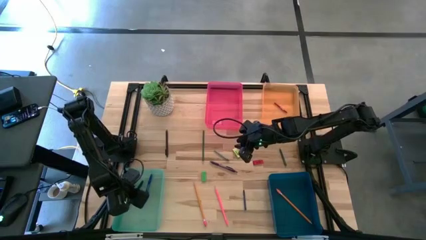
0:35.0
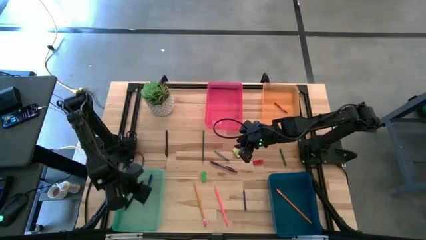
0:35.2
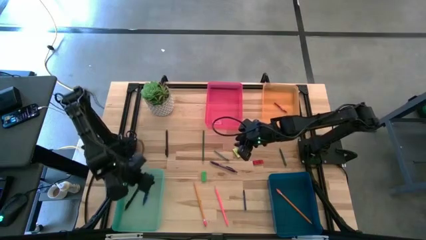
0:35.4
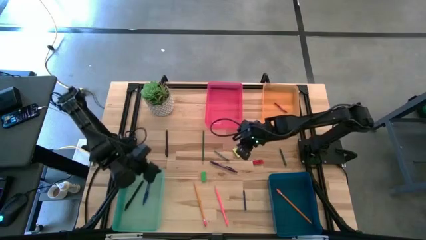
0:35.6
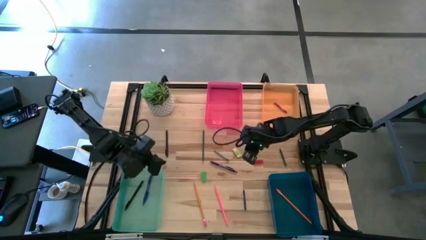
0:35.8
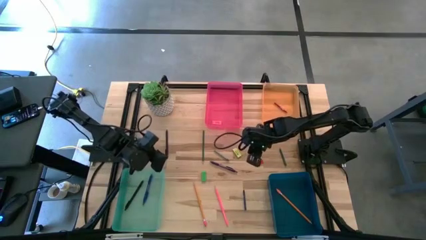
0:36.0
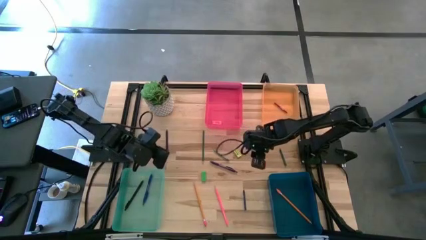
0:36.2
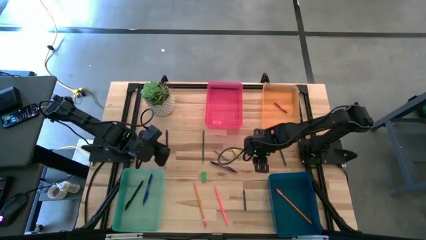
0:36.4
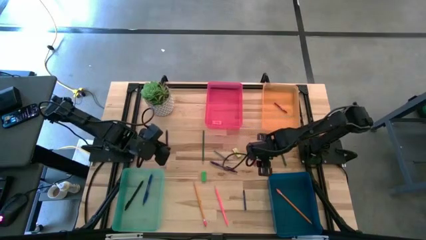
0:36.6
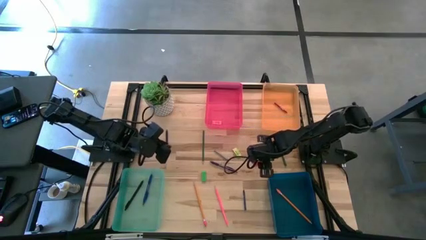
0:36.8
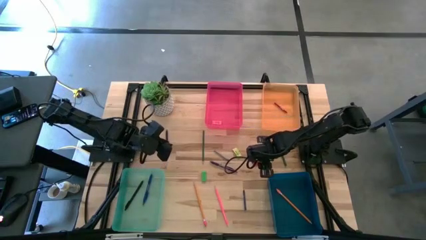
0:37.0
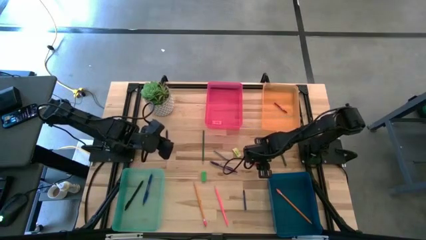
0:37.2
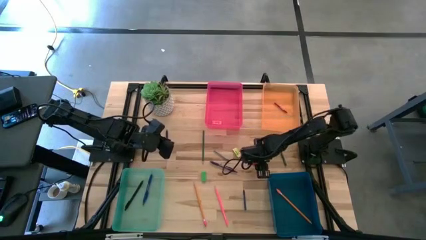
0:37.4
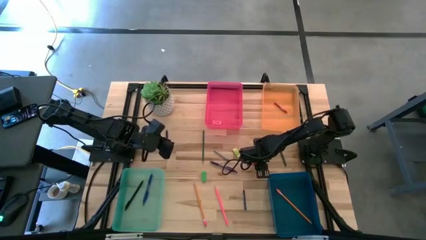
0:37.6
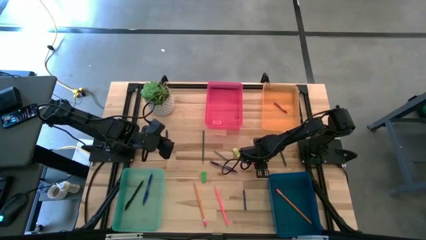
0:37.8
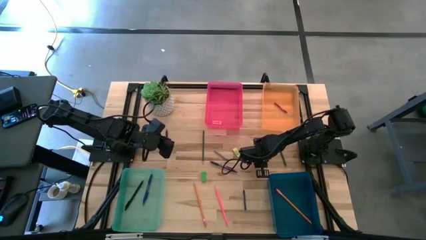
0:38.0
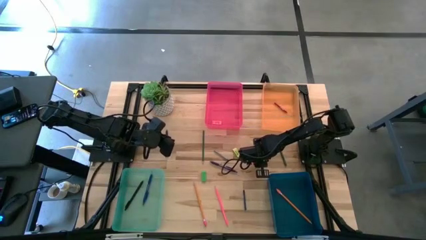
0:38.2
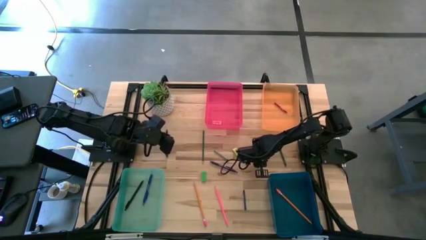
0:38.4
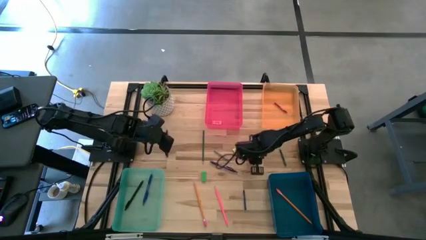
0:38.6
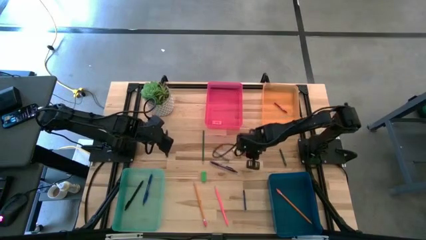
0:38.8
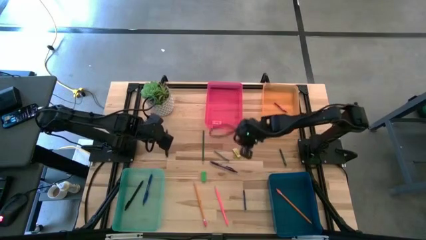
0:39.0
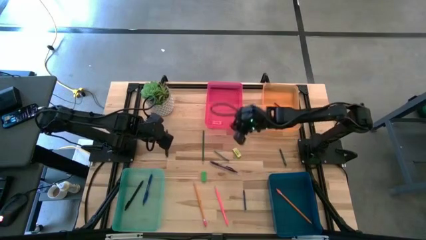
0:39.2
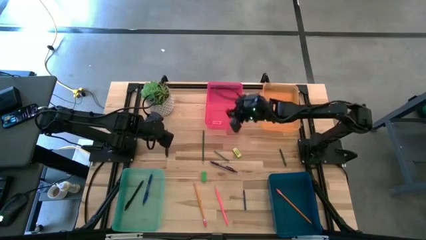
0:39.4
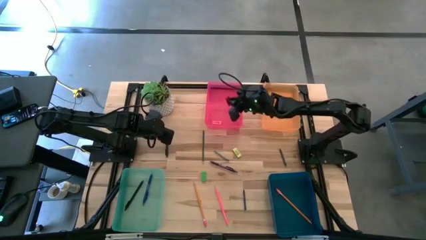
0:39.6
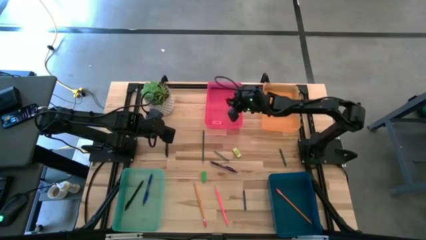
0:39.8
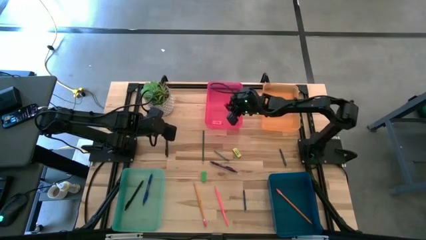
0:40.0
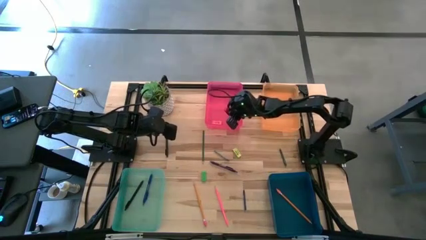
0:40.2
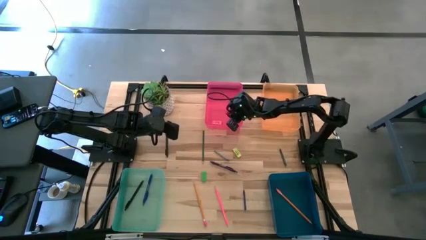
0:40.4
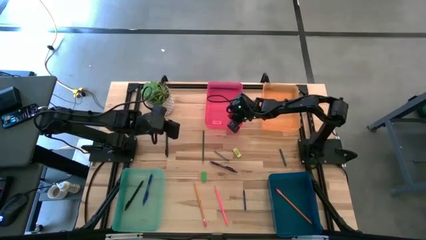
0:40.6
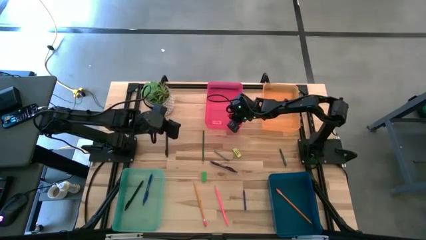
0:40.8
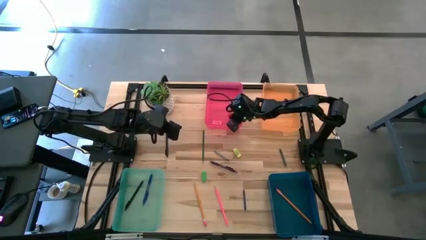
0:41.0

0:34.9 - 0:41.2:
Task: Sort crayons/erasers/pens/pencils in bins
Put the red eraser into the pink bin

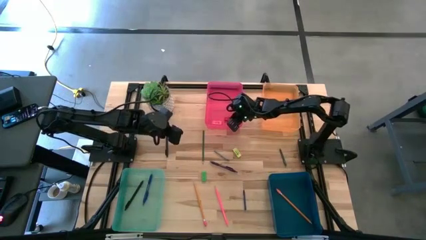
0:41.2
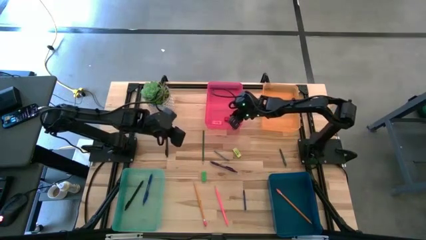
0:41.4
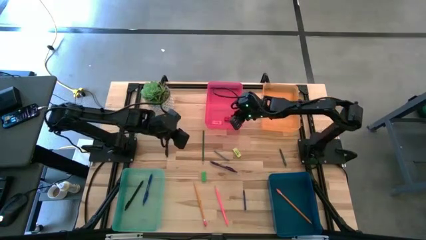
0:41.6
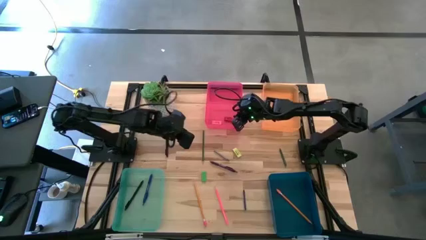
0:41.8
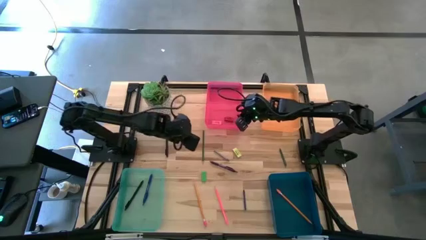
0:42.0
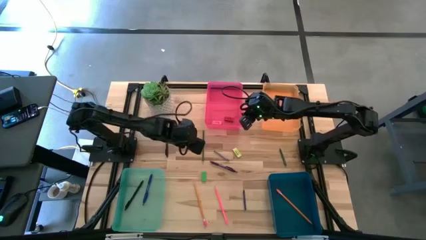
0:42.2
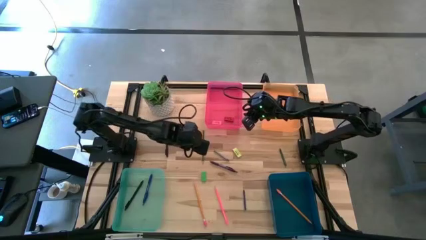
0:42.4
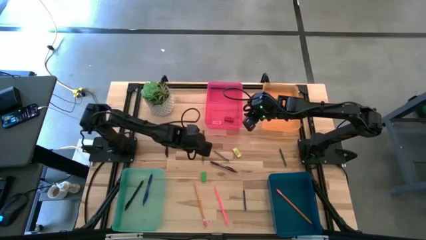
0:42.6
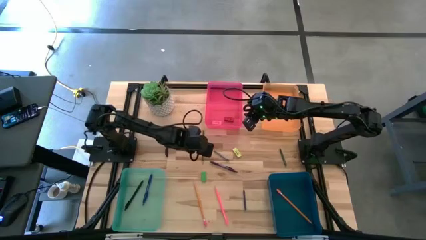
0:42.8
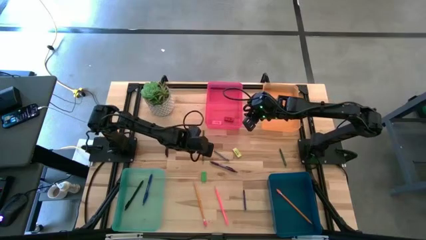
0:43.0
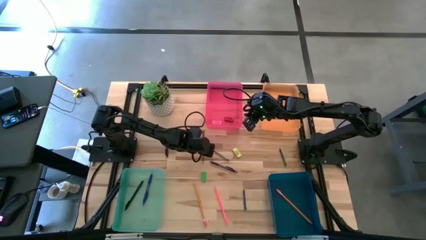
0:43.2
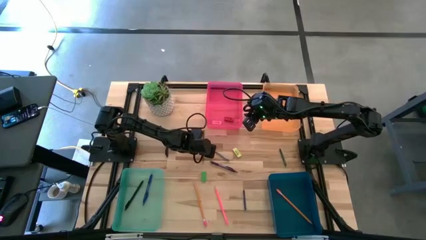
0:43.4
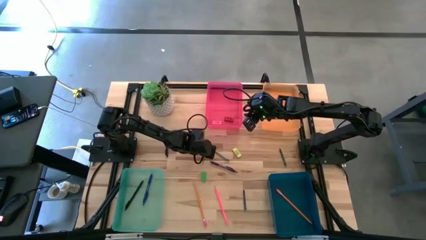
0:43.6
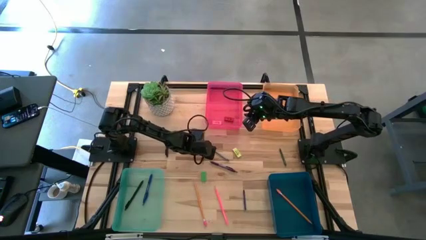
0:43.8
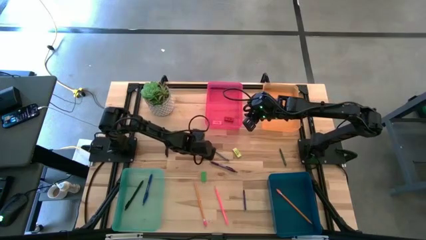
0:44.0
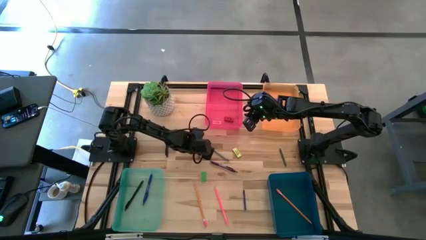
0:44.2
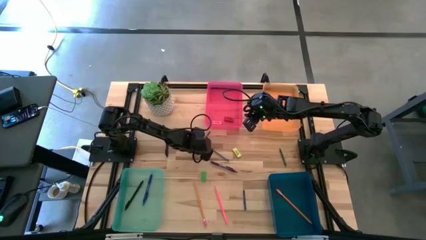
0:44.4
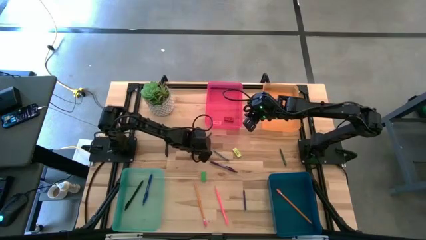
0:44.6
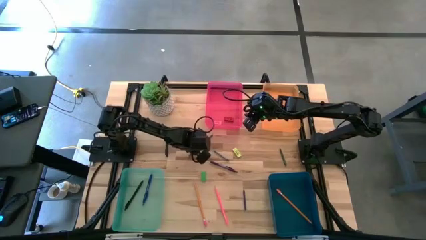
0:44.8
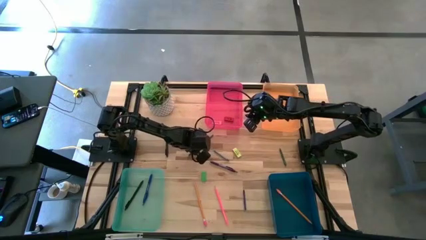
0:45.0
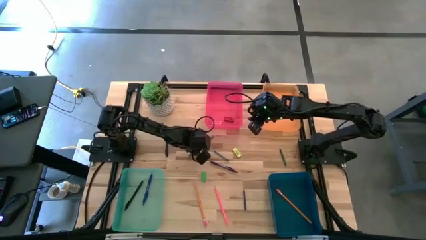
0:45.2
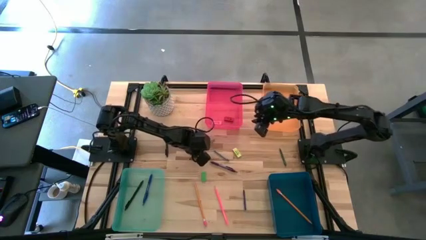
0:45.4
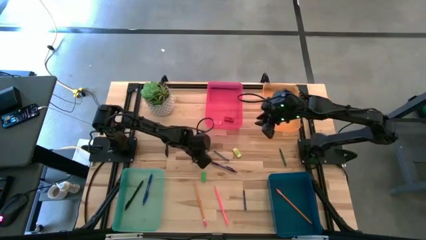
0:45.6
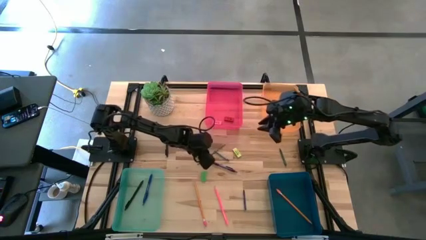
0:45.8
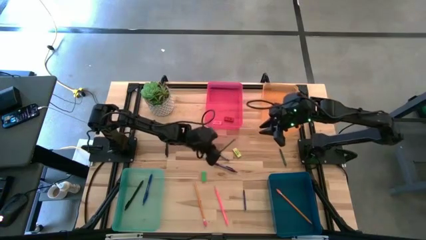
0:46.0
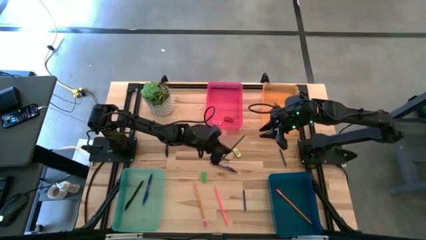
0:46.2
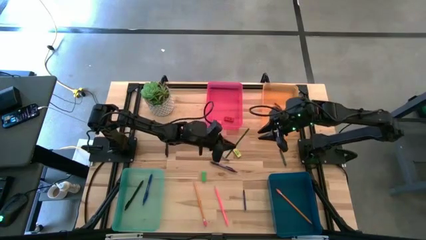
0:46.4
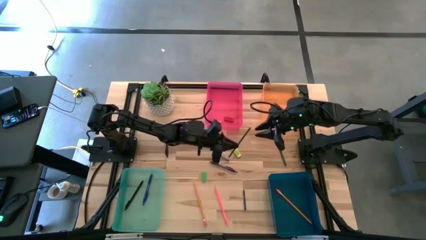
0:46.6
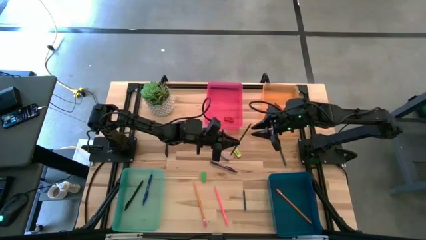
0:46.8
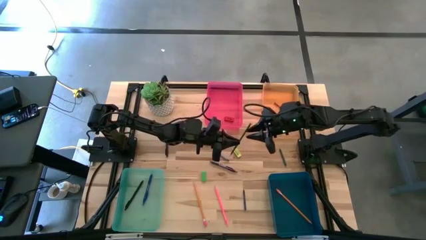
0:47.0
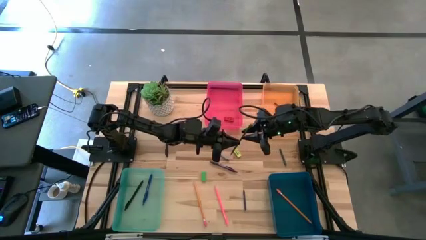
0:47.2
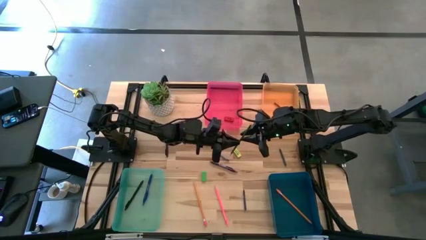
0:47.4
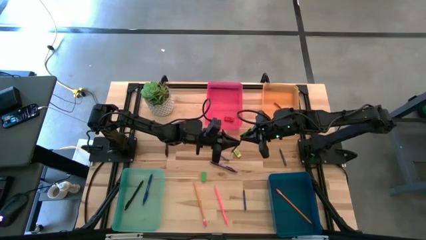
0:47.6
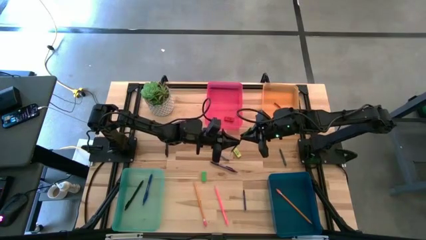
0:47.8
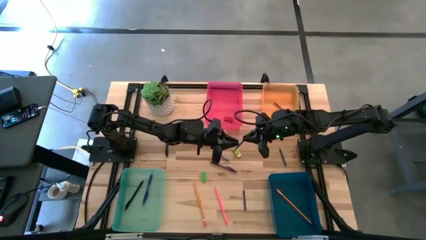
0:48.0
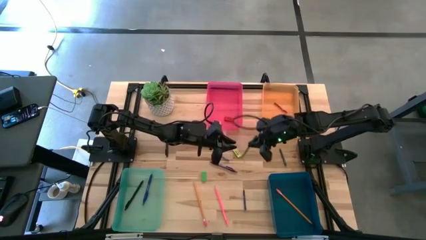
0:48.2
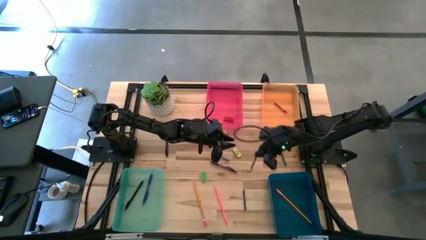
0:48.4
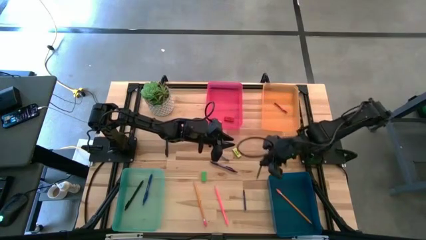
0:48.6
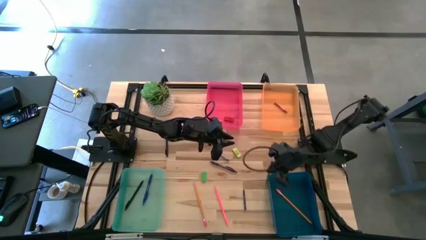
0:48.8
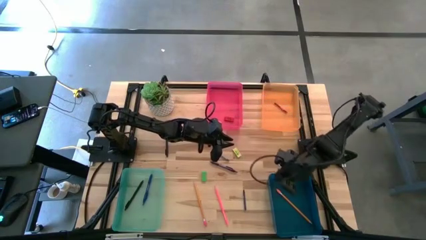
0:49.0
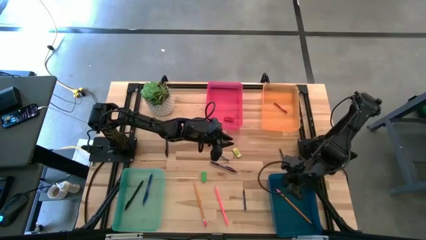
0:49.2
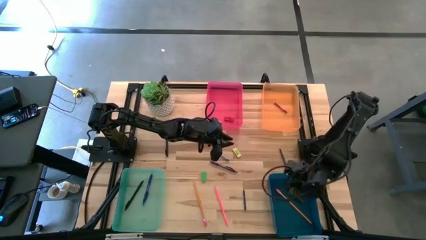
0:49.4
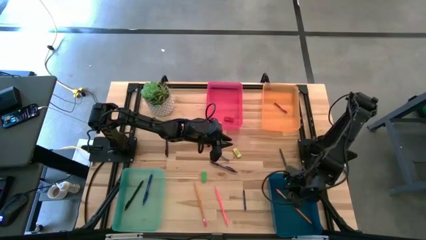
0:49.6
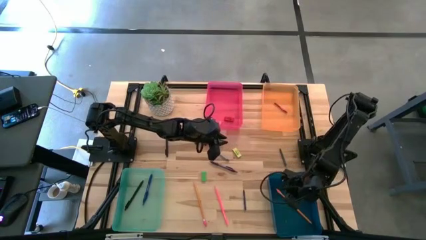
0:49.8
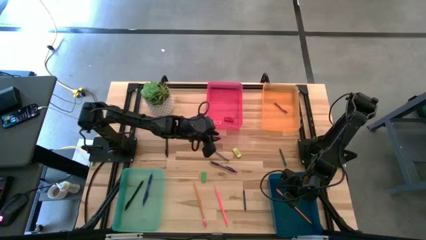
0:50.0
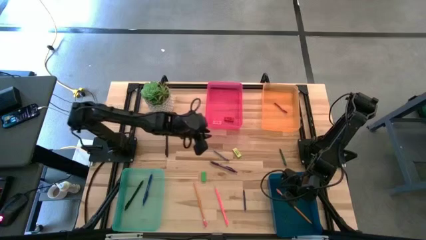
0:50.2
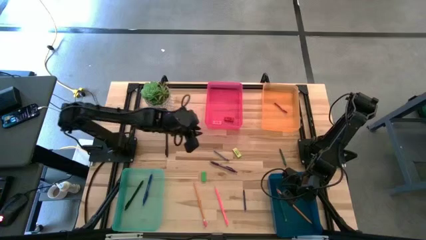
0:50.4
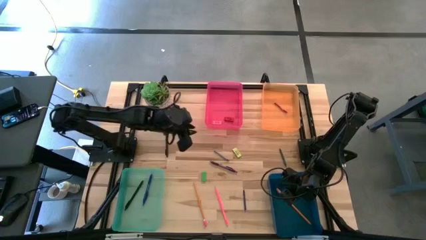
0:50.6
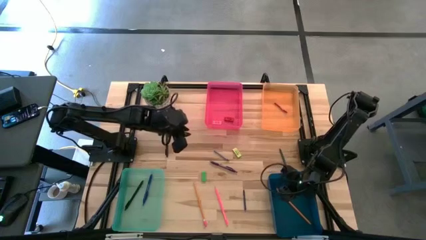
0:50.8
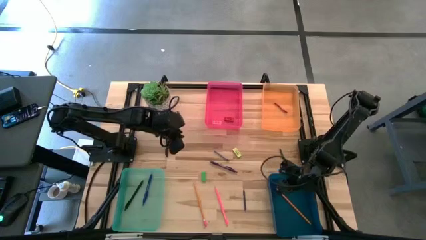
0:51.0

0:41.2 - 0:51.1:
Put the green color pencil into the blue bin

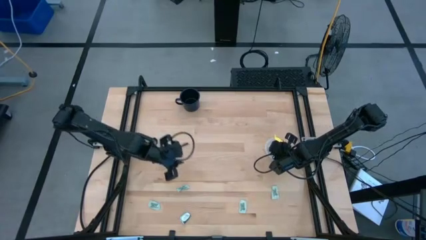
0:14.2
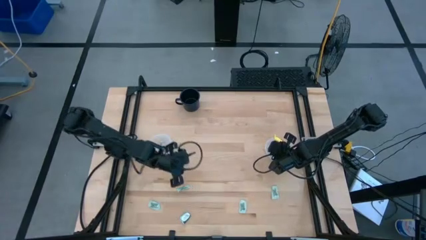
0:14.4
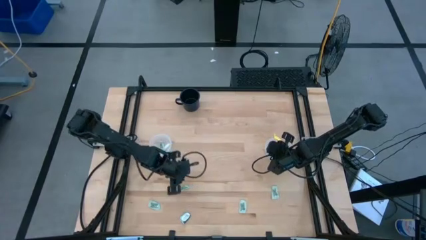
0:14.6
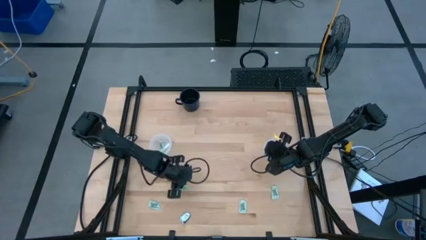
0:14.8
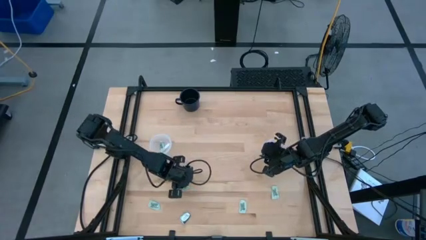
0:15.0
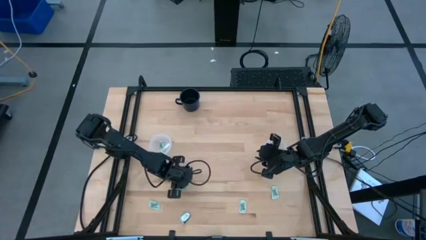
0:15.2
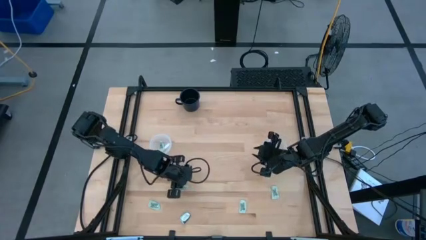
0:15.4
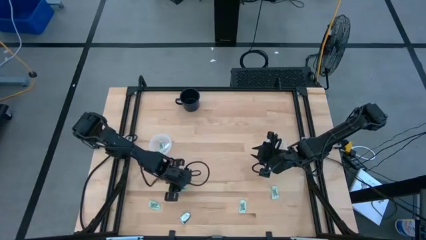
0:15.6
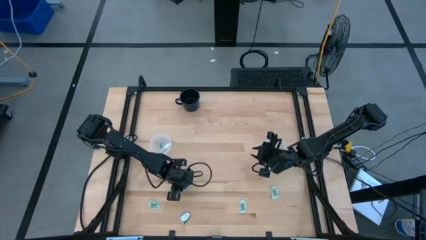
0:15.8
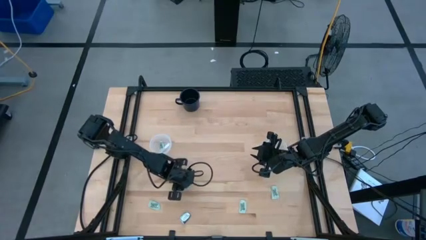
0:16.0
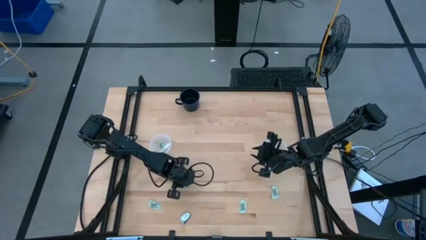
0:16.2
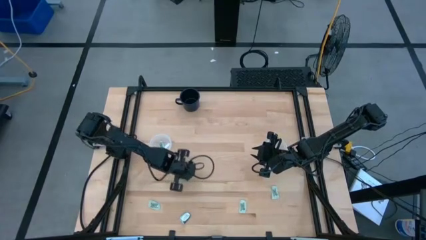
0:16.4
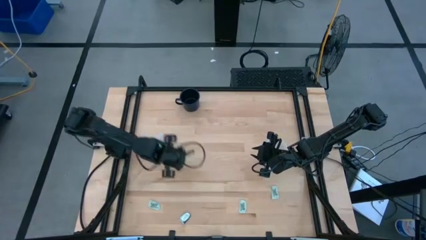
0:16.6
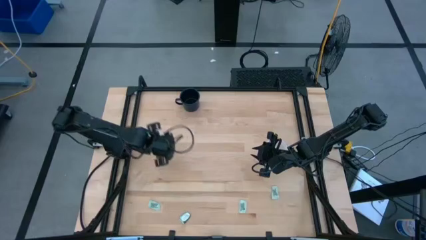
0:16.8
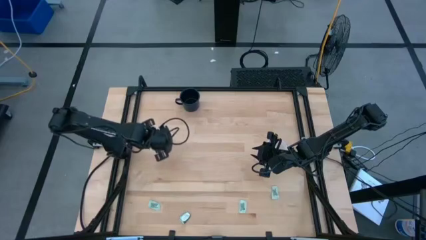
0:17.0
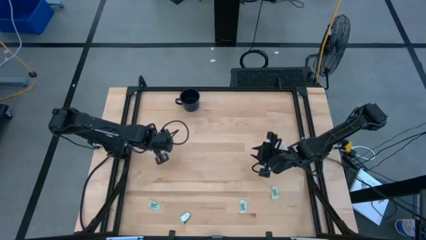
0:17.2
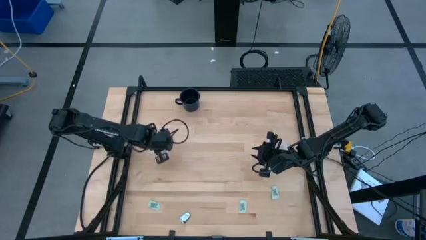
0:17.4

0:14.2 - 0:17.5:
Task: Pick and place Stevia / Truvia into bins
Put the stevia packet into the left container
